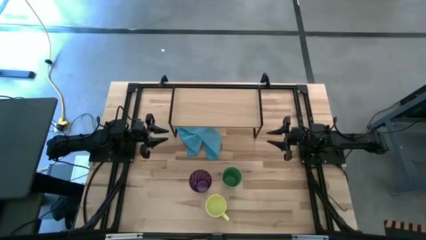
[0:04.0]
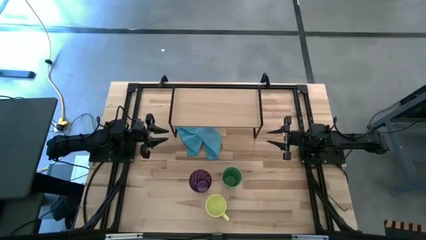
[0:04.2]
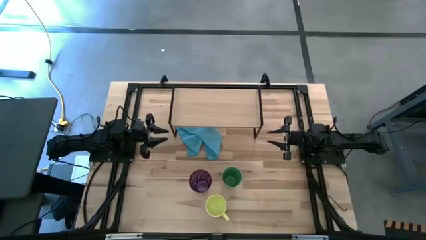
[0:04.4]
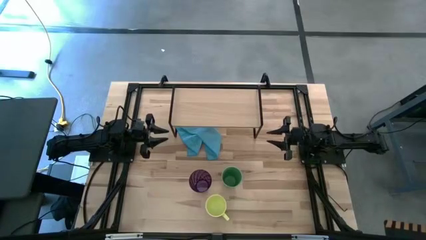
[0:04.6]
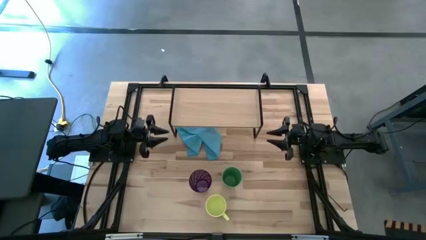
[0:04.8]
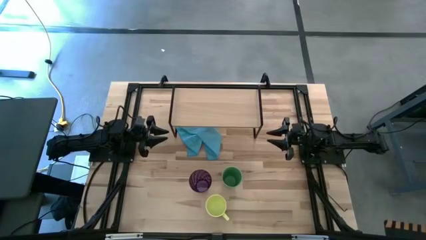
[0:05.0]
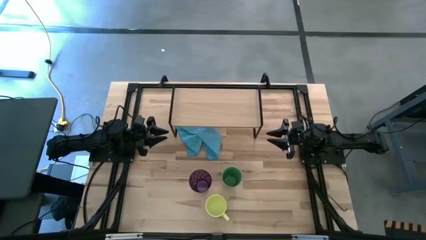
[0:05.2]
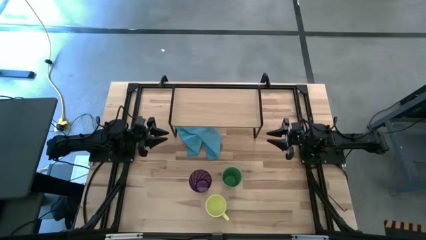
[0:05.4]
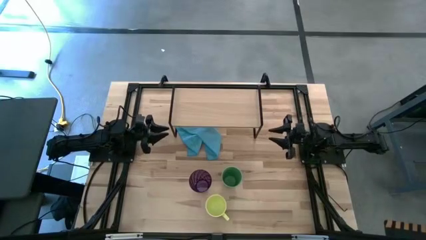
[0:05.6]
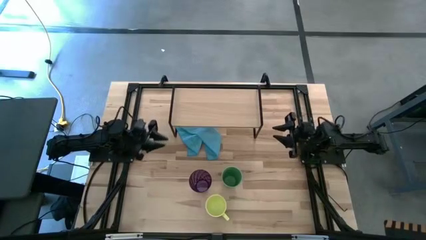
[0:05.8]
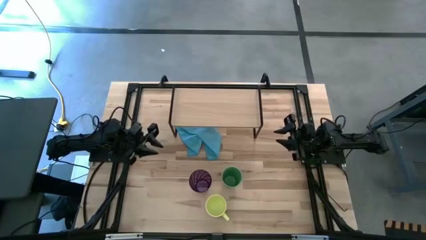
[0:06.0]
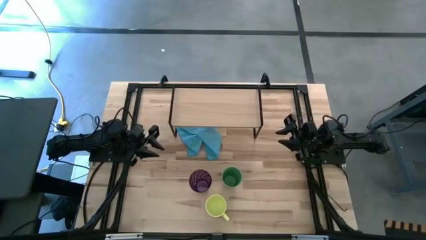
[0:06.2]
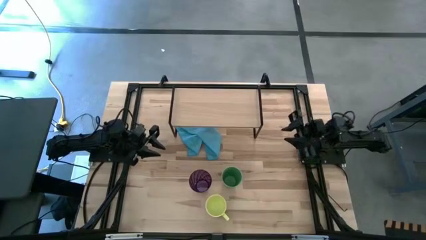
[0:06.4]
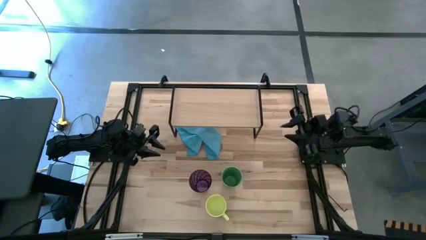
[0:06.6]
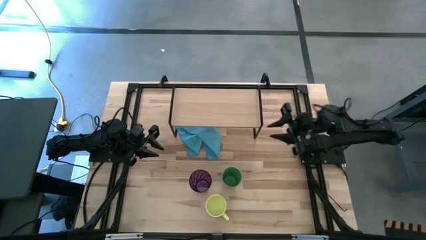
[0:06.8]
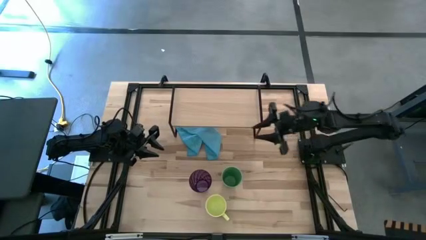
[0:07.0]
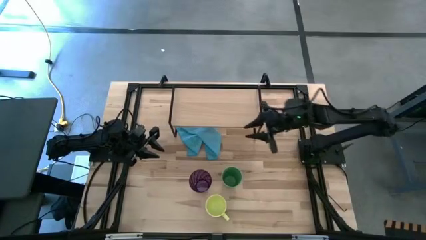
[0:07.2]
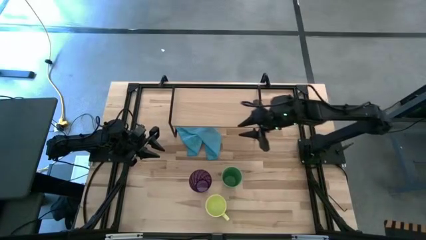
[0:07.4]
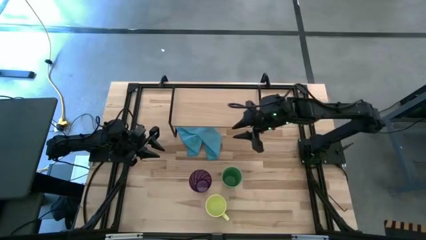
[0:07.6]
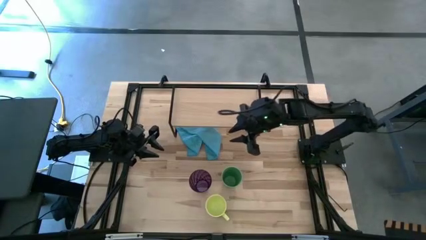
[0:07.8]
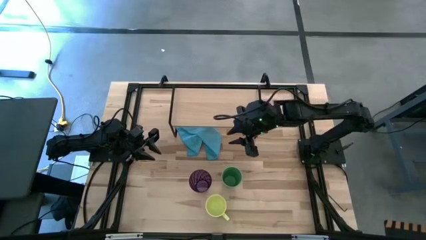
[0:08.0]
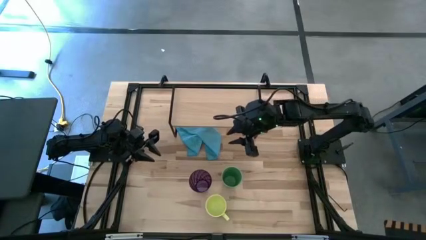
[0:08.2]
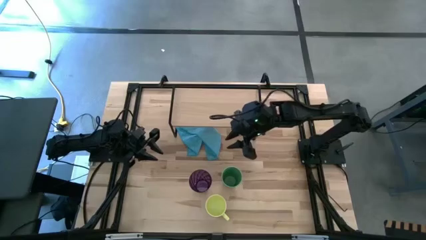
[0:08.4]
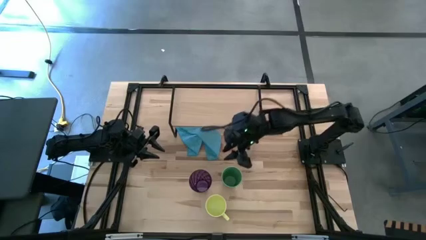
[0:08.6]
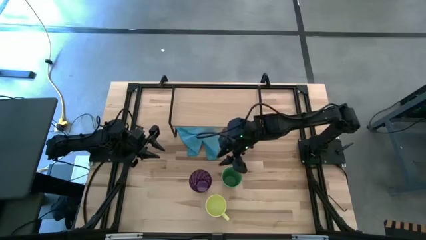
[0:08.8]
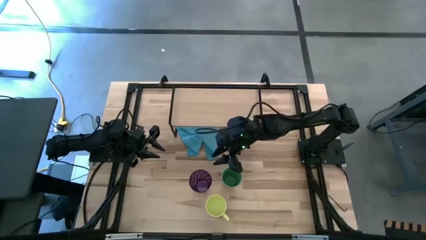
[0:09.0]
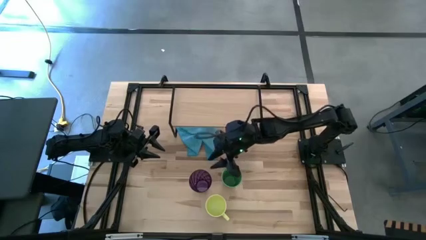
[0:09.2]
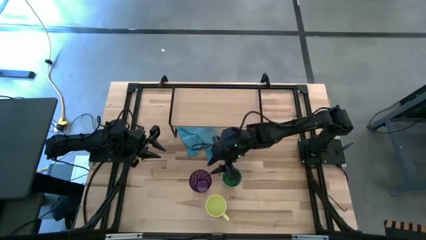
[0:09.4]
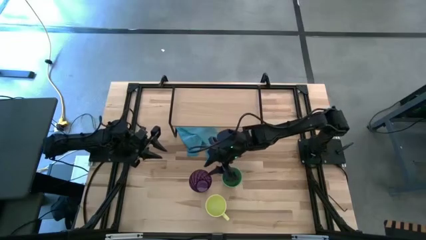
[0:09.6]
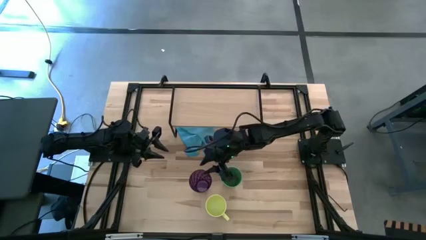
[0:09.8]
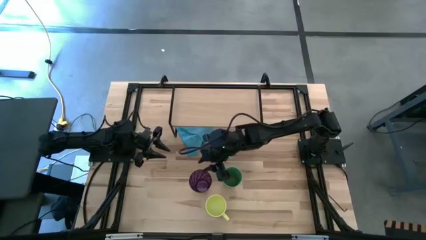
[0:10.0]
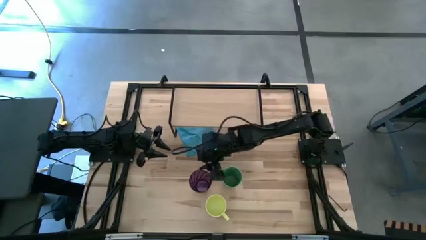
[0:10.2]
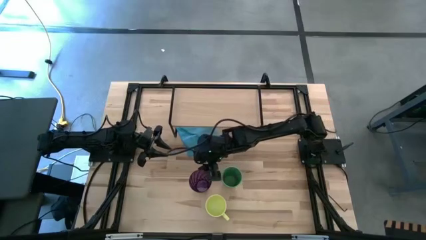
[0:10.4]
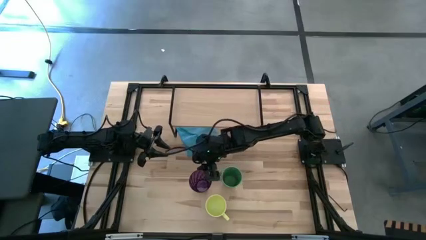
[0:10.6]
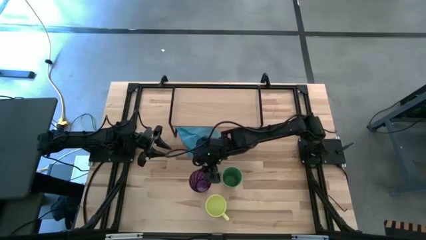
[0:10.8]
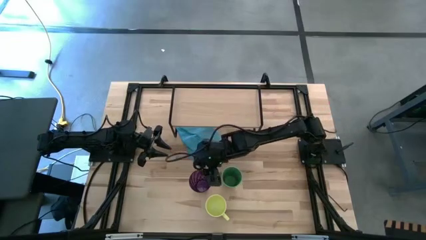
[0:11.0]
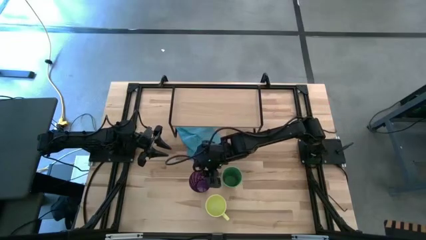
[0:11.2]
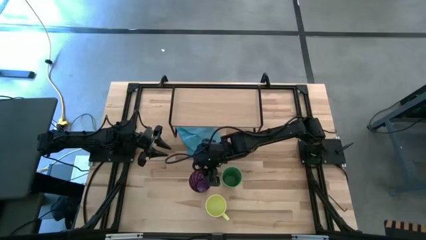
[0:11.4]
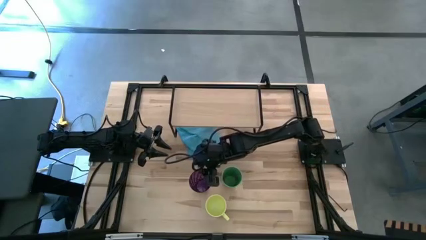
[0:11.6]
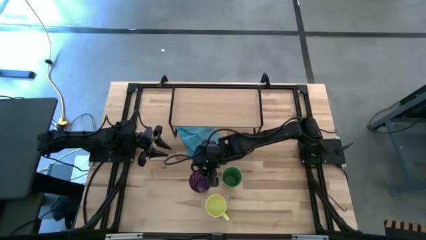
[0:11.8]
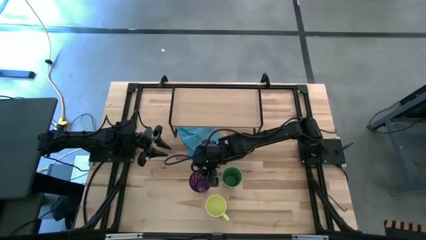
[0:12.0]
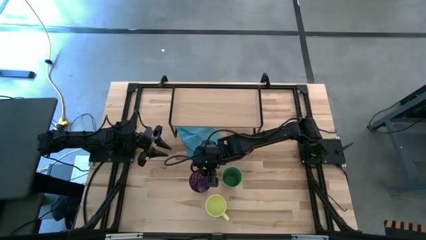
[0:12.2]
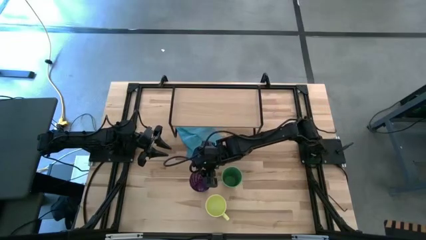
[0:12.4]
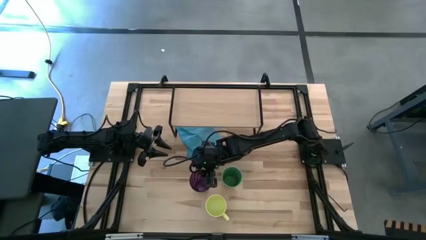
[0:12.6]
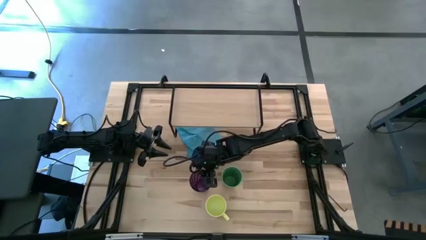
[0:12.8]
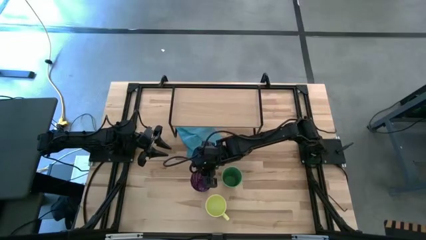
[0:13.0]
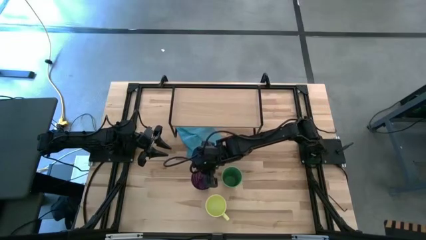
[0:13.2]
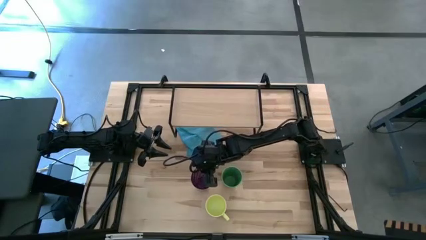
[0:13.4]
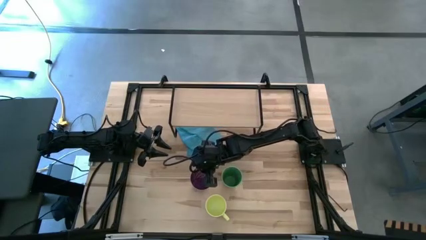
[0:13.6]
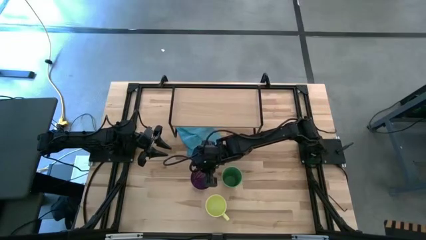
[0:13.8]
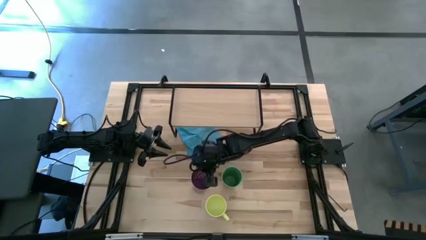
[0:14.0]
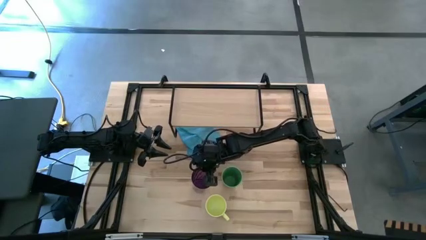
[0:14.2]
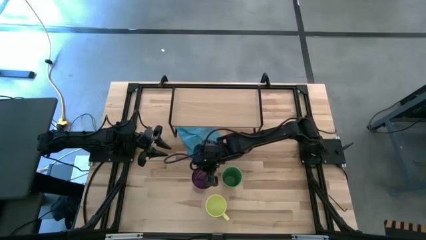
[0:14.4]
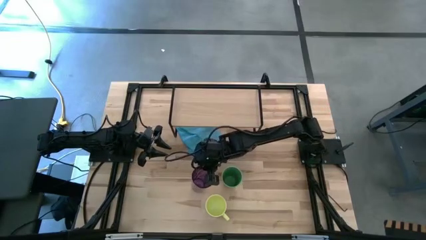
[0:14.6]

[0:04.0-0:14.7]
Task: Stack small to large cups/mugs on shelf
Put the purple cup on the shelf

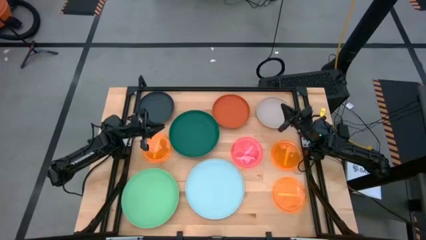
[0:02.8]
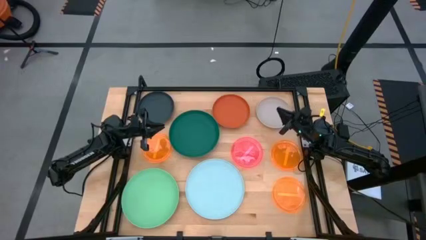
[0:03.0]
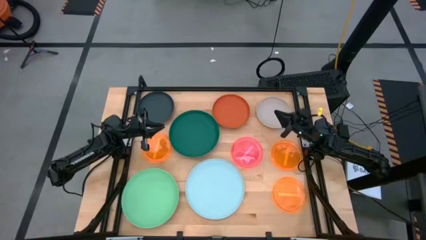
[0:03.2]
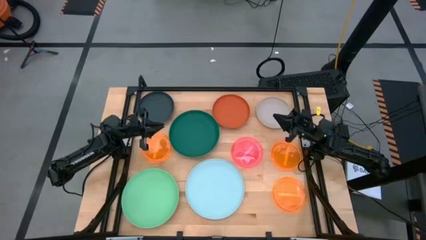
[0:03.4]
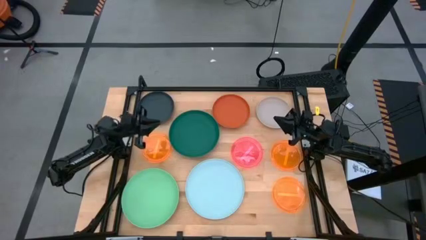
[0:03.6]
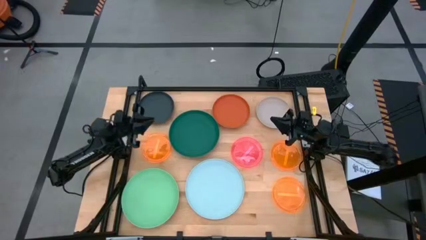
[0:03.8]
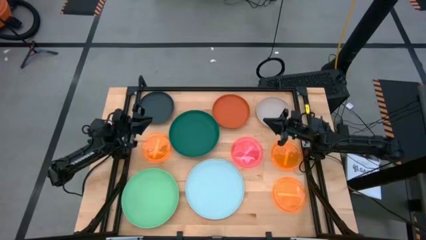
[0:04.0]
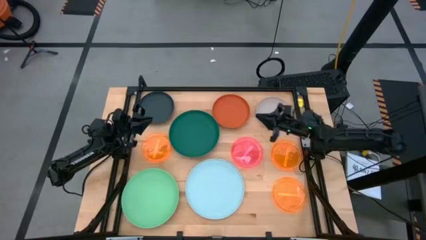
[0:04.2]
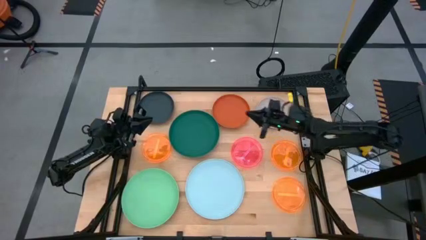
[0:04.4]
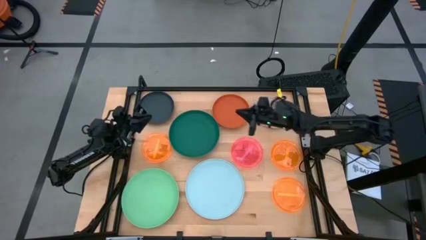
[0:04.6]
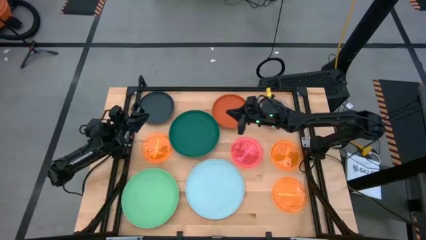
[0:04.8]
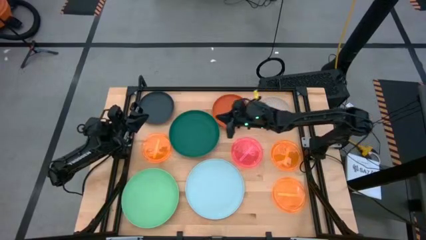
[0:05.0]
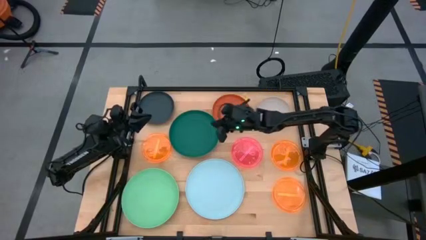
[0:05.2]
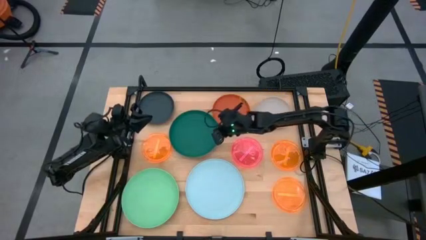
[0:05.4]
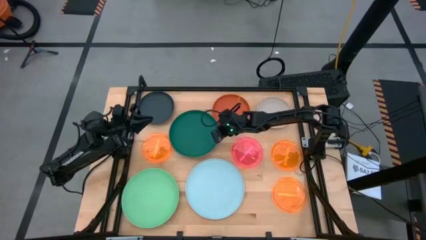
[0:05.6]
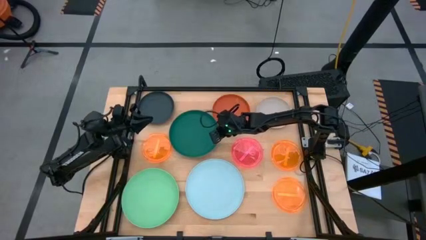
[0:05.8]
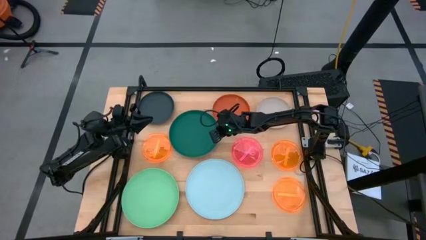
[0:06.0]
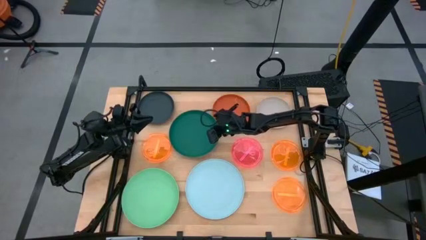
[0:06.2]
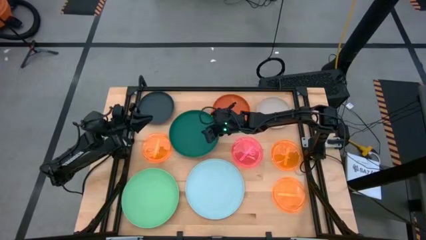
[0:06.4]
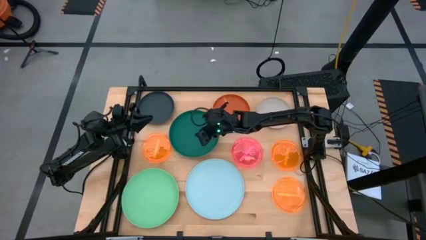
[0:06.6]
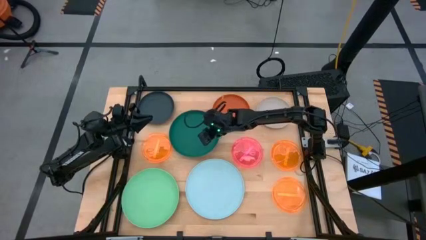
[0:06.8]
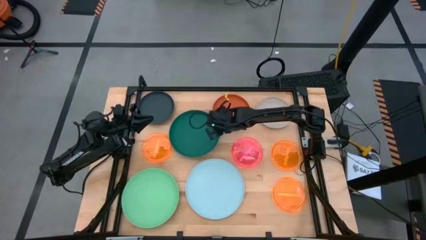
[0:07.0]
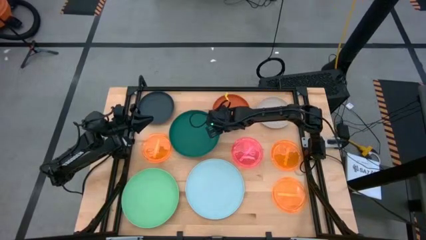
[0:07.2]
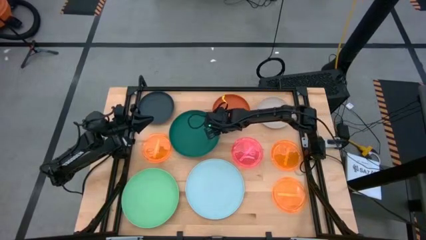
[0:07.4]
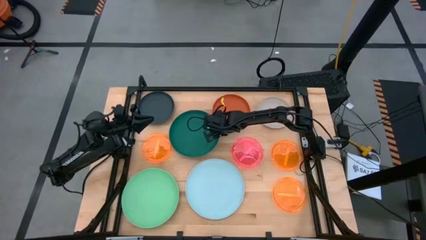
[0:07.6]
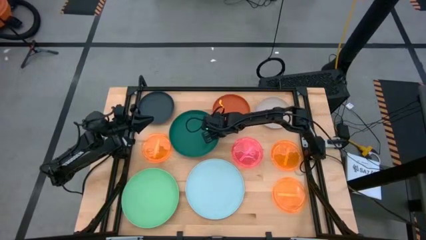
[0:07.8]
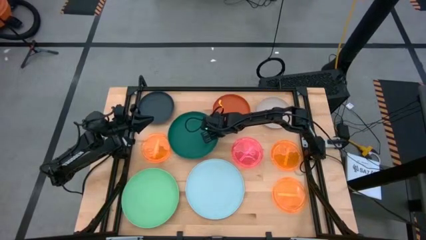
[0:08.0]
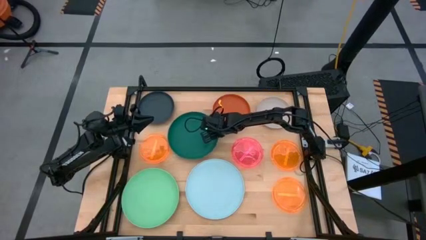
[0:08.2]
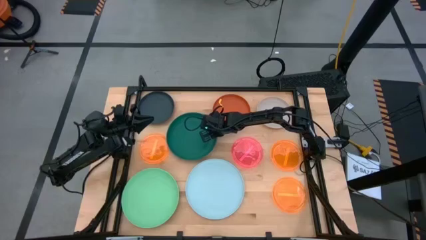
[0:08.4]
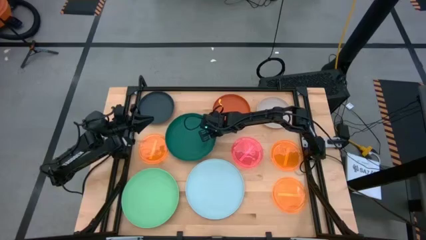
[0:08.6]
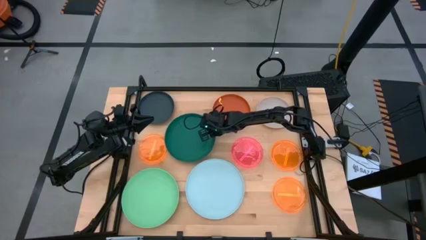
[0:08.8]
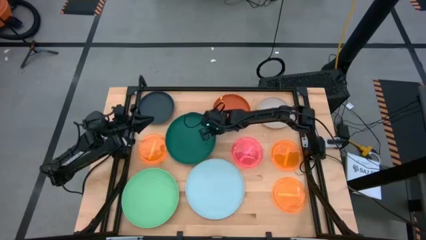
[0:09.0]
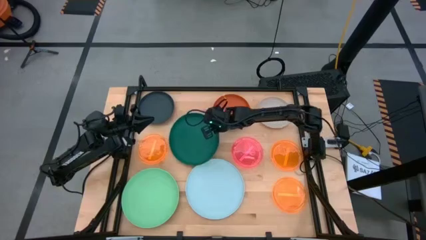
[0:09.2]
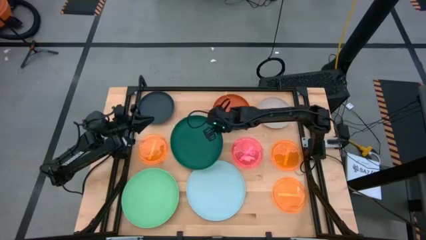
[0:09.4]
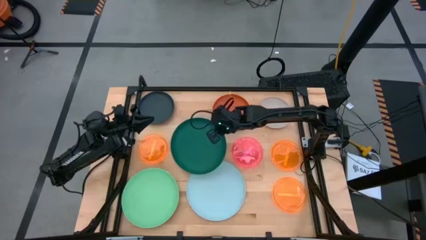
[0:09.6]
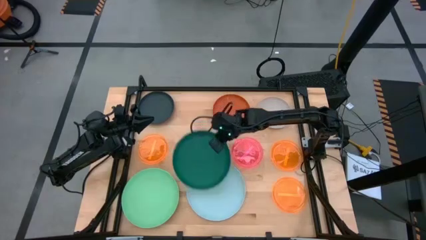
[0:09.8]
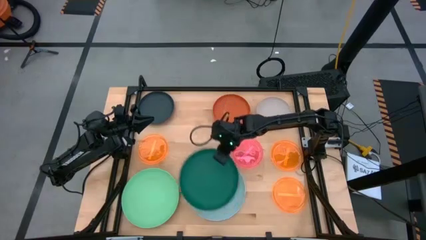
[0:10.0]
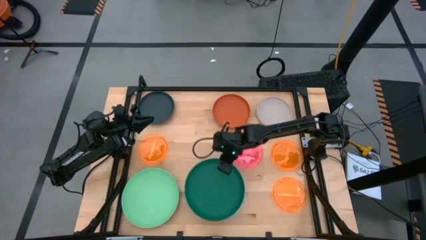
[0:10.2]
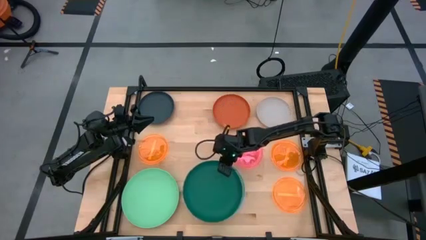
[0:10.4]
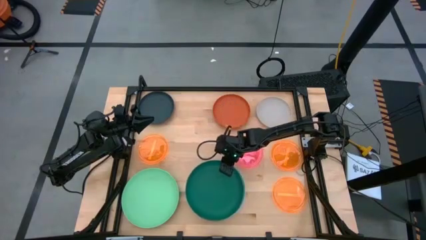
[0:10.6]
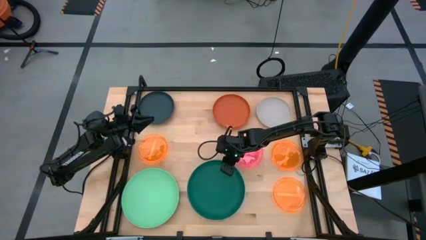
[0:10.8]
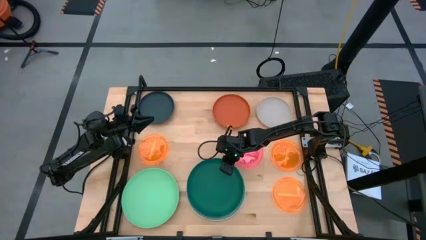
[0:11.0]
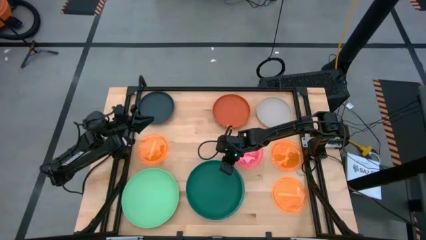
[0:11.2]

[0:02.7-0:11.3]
Task: Stack plastic plates
Stack the green plate on top of the light blue plate
